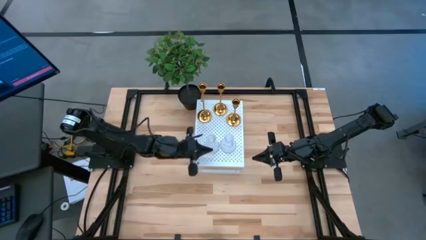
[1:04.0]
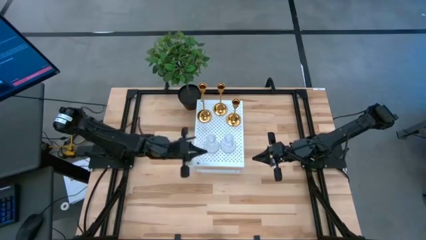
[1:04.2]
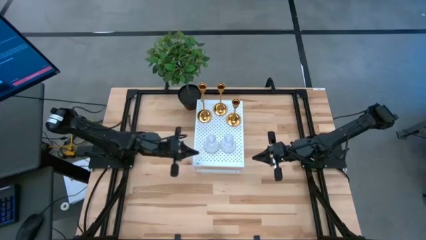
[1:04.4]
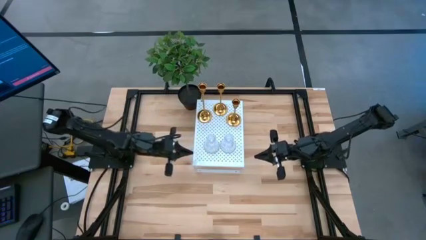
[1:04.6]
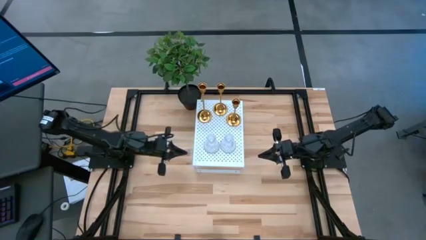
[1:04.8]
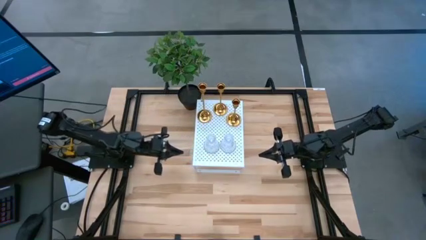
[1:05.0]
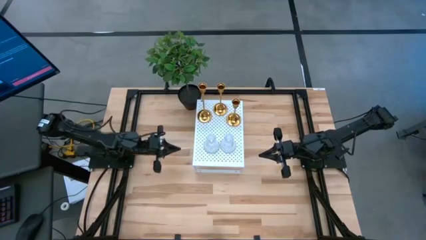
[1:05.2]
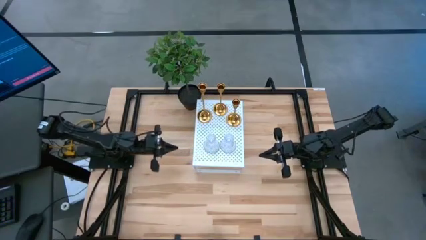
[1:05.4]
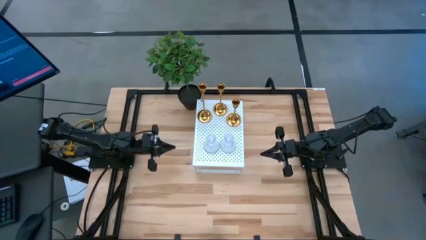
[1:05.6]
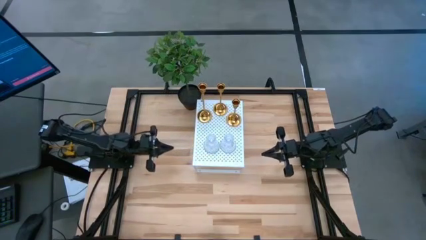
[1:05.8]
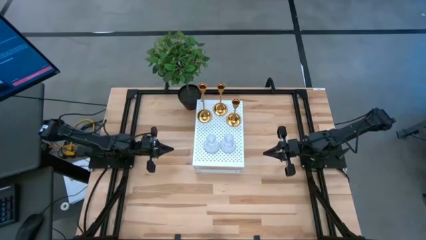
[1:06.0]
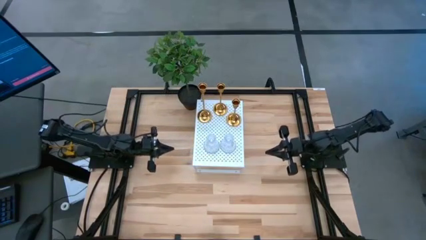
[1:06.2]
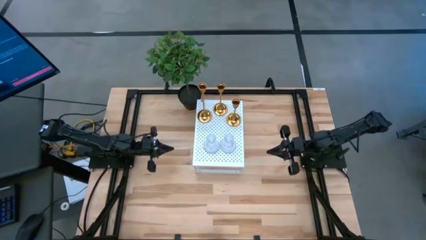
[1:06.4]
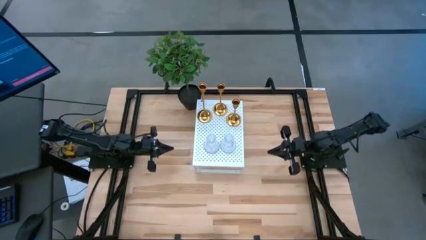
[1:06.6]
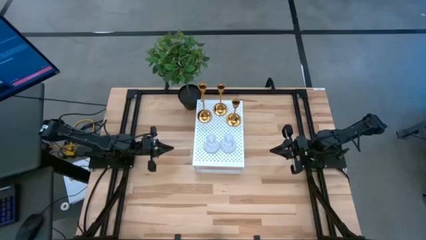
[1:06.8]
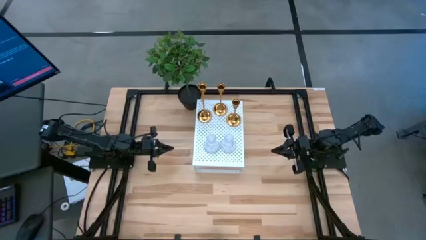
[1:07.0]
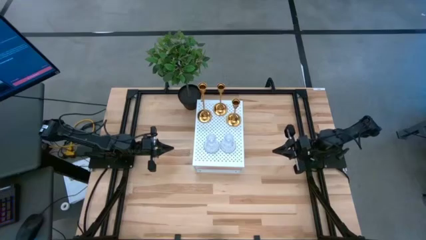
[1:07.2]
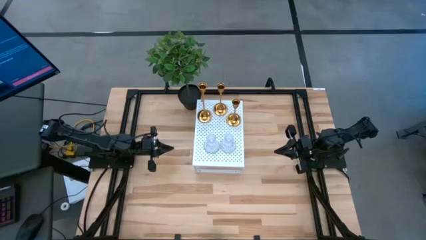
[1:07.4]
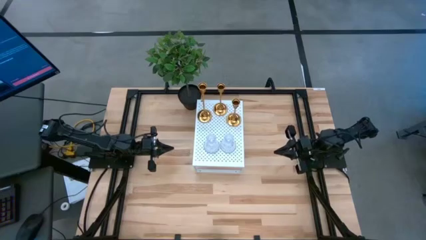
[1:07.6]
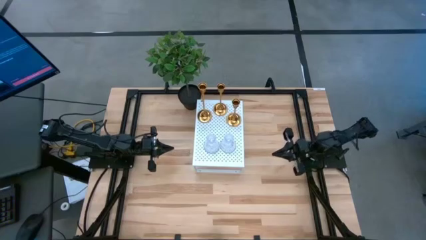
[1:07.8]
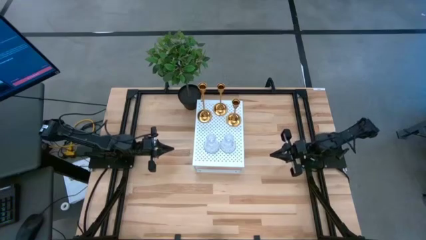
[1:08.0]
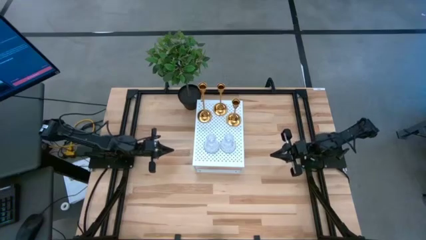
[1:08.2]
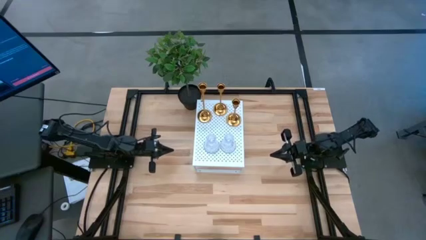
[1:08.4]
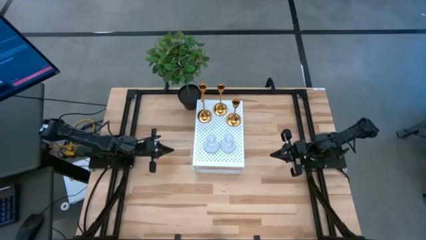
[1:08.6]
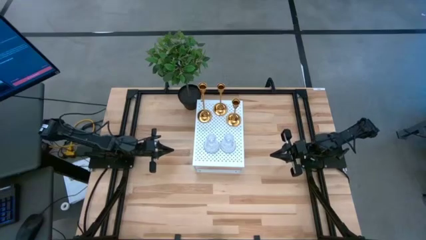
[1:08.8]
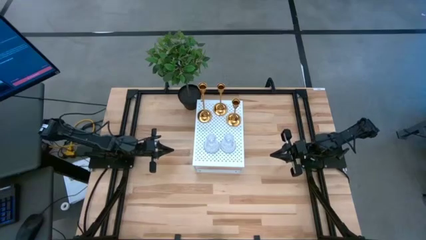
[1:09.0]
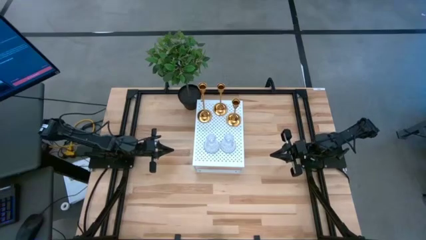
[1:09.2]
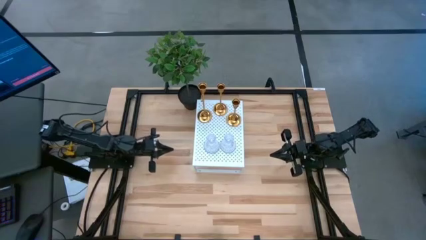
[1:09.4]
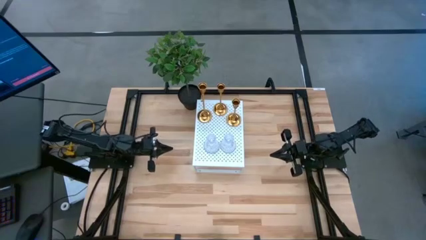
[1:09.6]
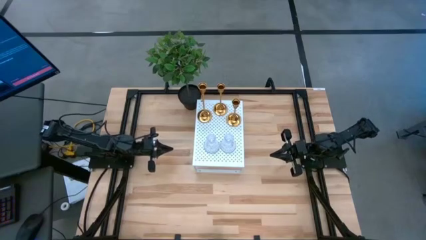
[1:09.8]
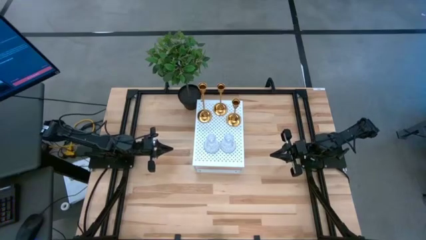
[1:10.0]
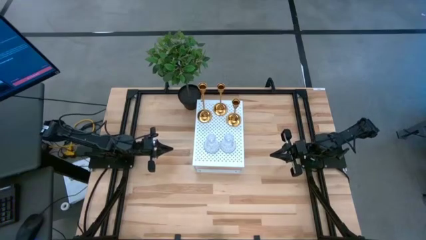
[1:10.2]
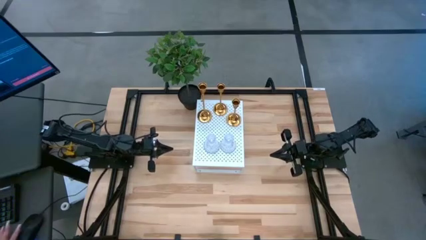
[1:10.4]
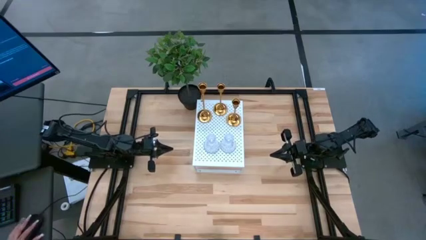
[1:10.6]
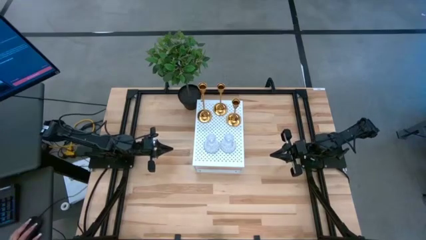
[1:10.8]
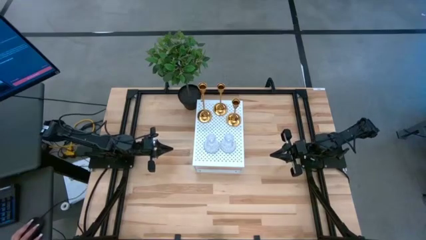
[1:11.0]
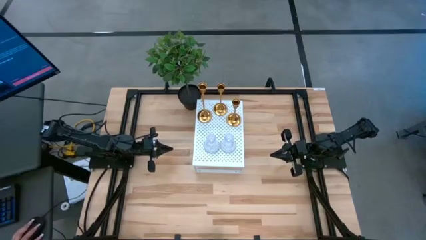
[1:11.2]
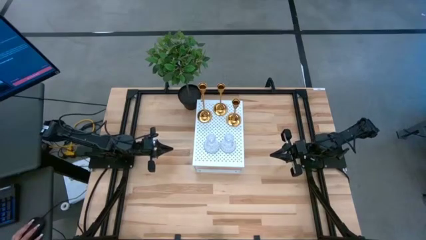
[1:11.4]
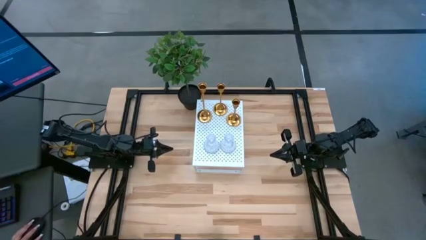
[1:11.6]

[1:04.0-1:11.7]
Task: Pick & Place candle stick holders
Return to Home Position
